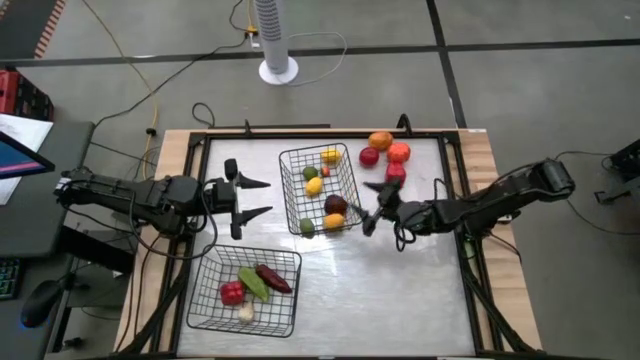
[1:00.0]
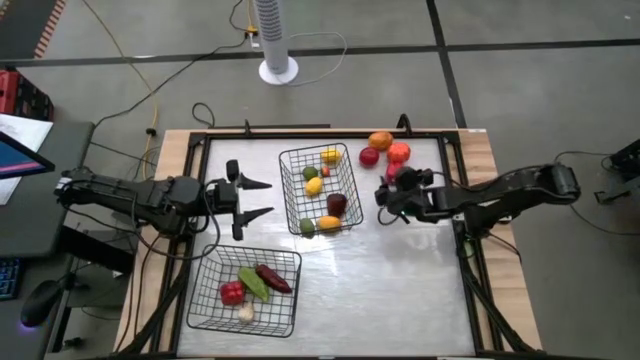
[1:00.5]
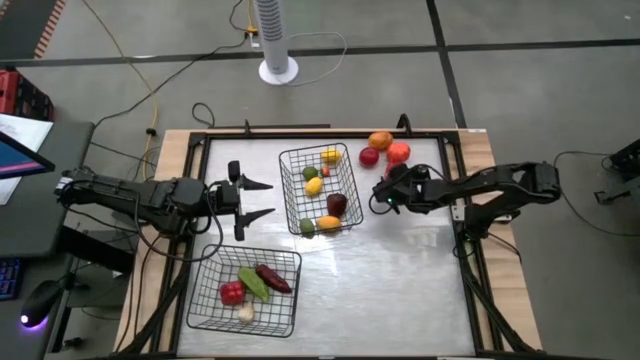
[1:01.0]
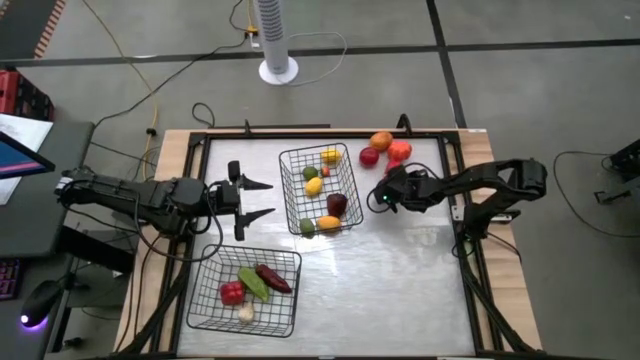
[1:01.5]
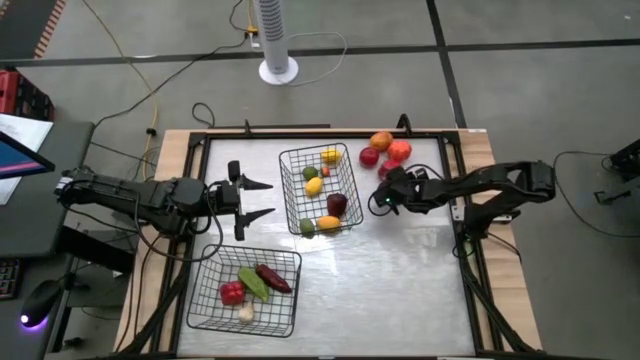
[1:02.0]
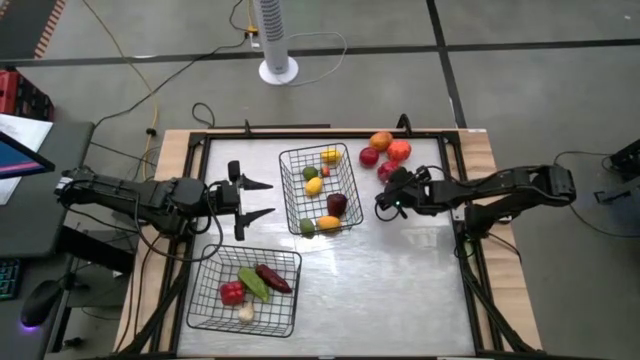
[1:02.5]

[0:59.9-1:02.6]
Task: Sort produce into baskets
Put the red bell pepper into the bottom black wire basket

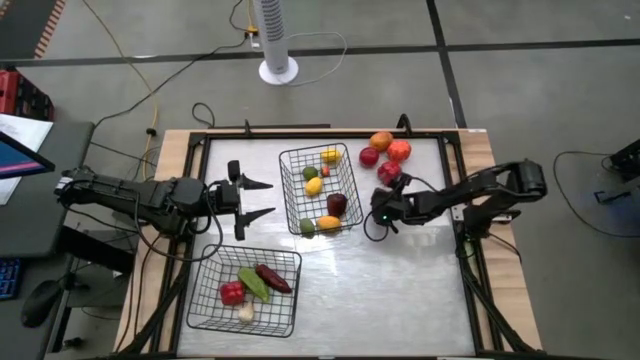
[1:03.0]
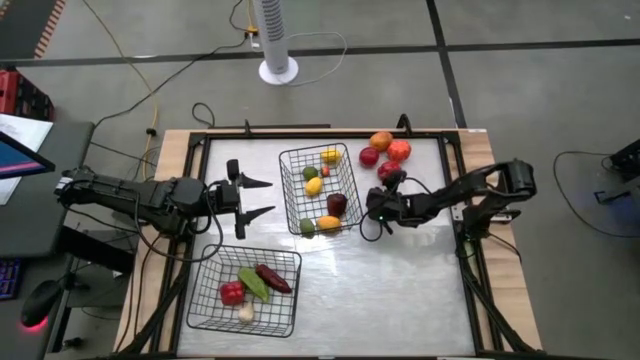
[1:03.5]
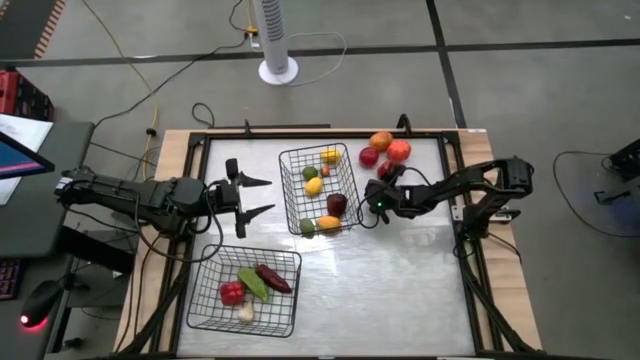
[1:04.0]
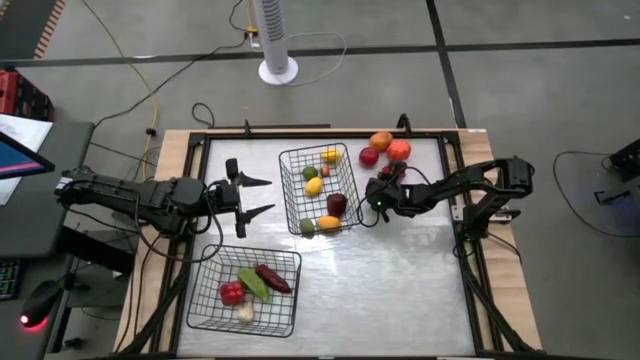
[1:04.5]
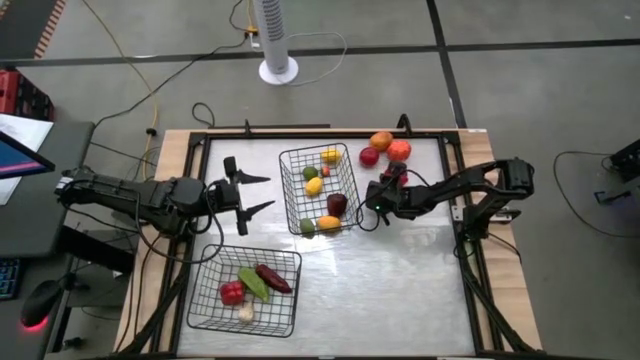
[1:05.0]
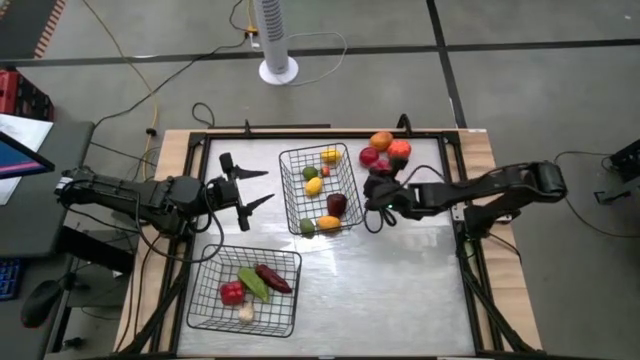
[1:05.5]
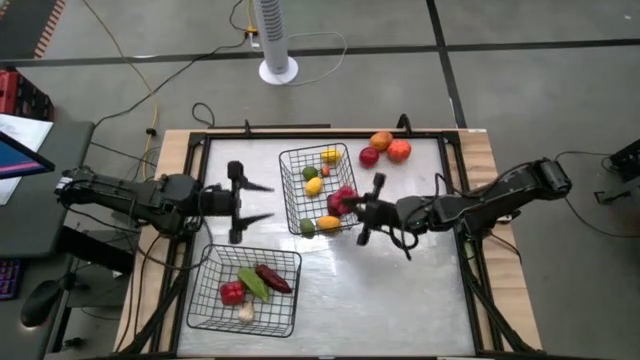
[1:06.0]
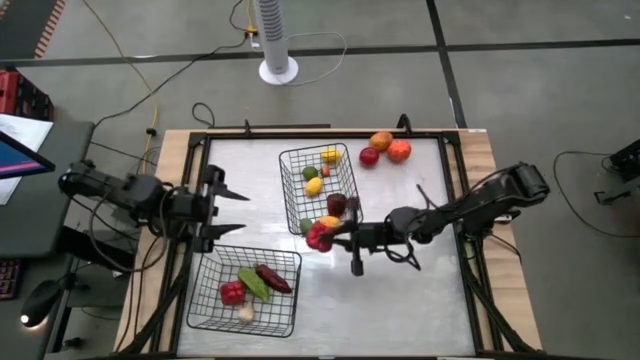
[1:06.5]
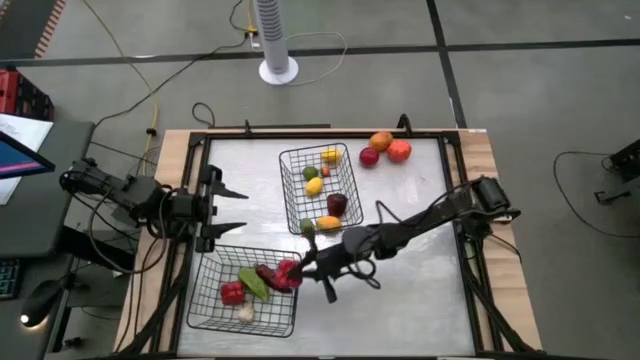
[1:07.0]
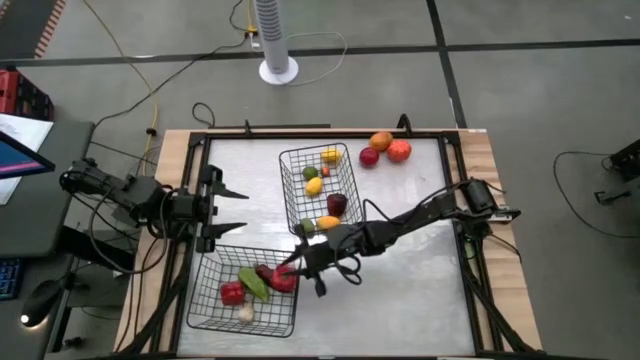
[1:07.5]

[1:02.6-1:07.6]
Put the red bell pepper into the bottom black wire basket

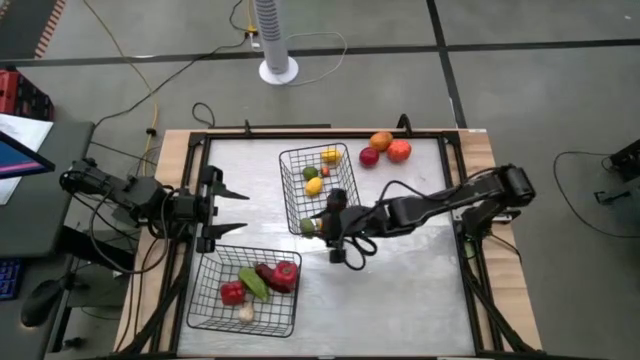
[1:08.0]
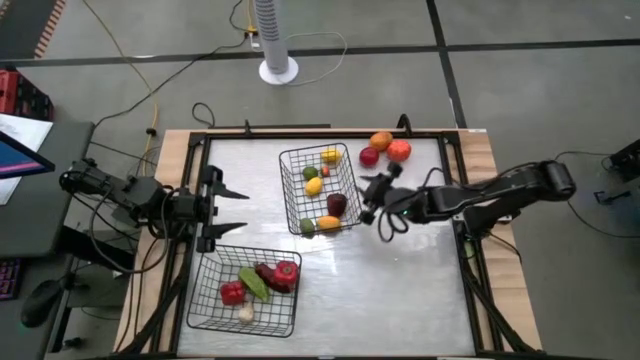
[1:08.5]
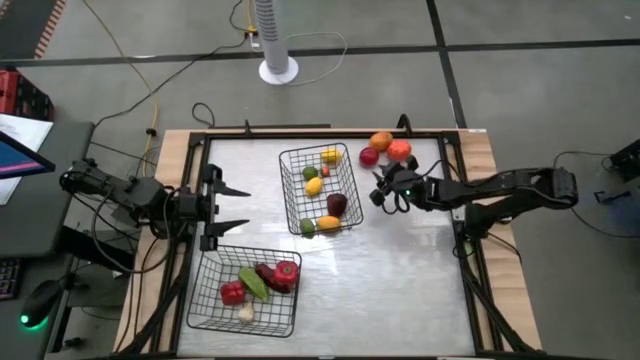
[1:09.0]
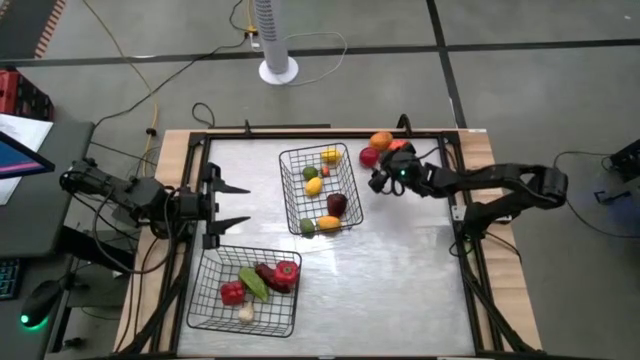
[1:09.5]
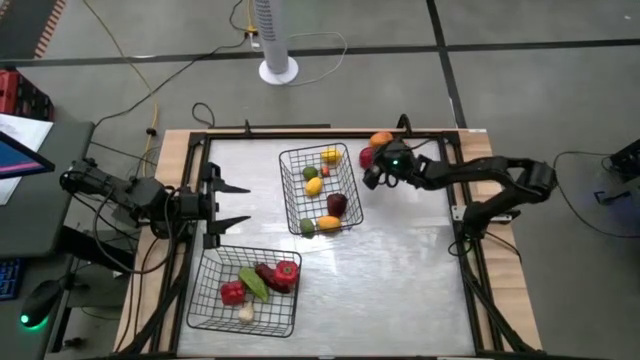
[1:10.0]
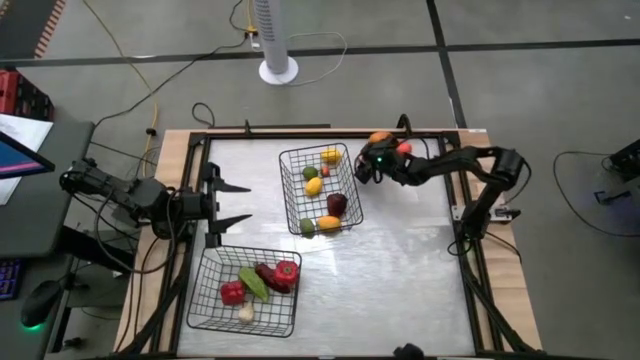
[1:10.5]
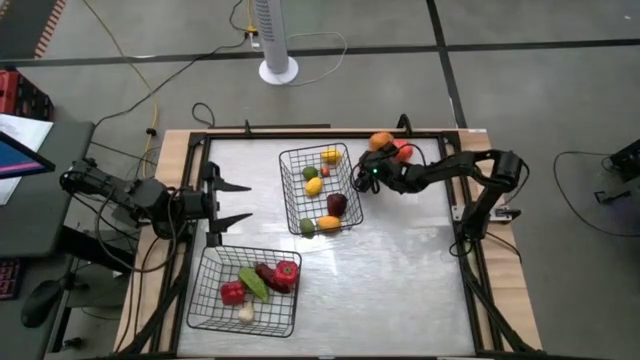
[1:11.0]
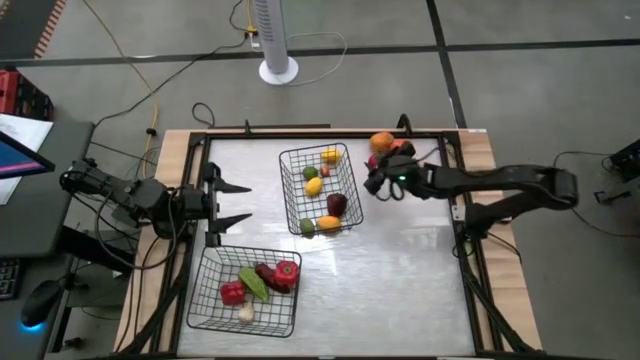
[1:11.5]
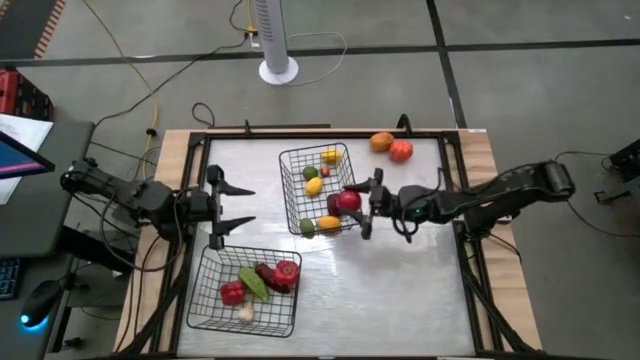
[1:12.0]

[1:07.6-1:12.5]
Put the red tomato into the top black wire basket

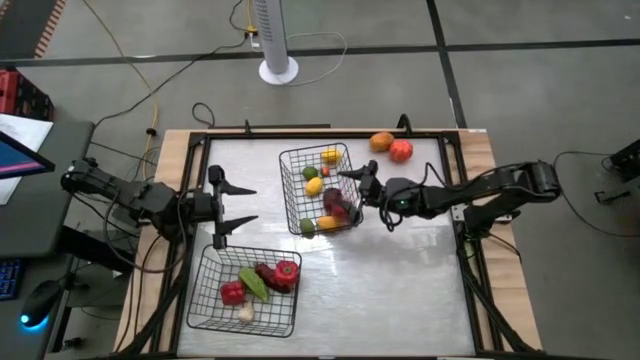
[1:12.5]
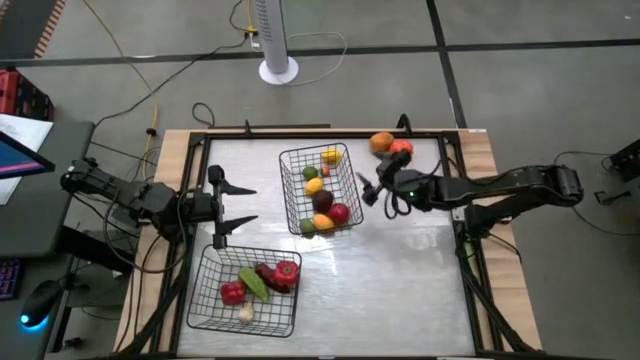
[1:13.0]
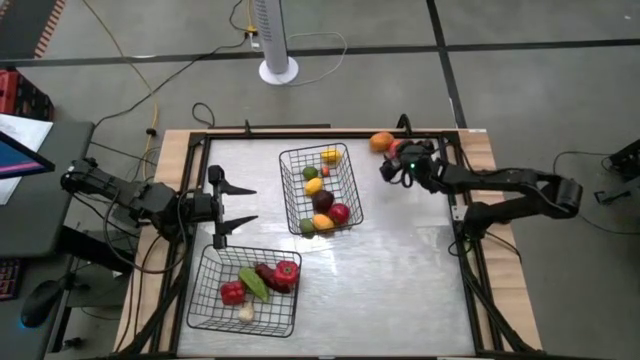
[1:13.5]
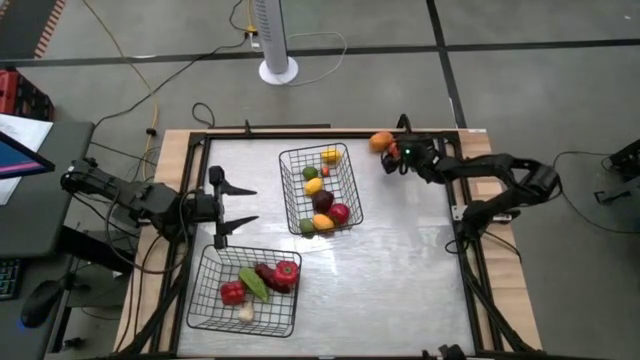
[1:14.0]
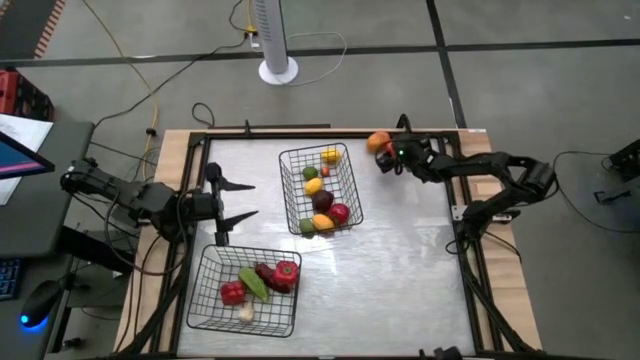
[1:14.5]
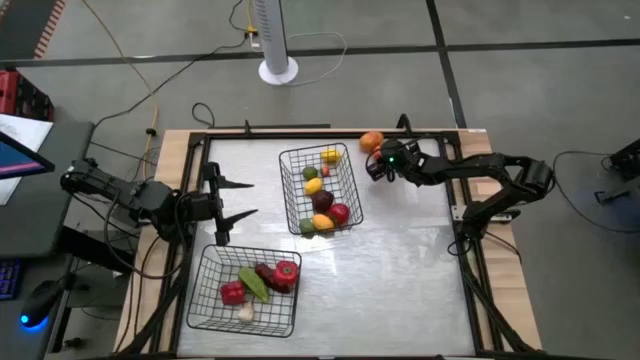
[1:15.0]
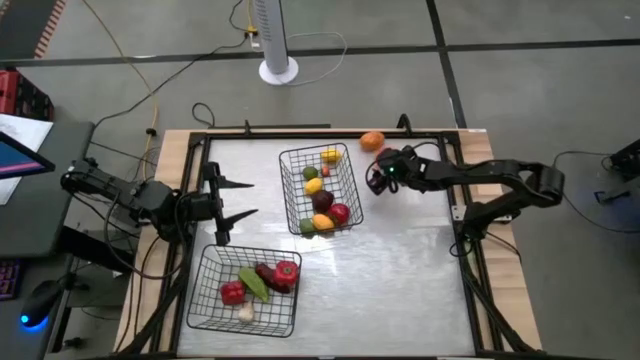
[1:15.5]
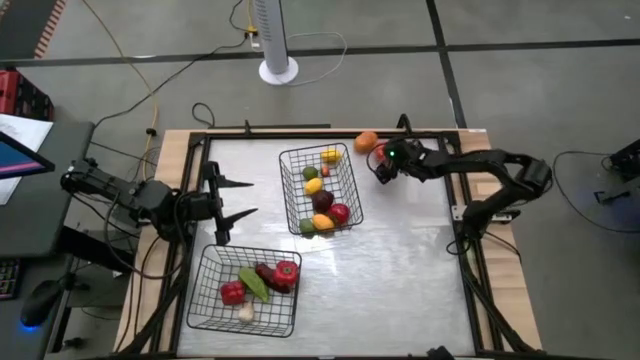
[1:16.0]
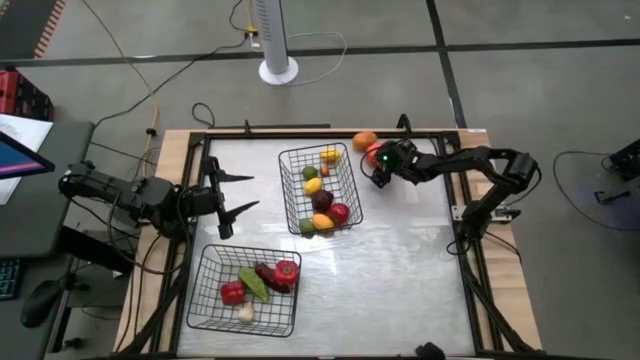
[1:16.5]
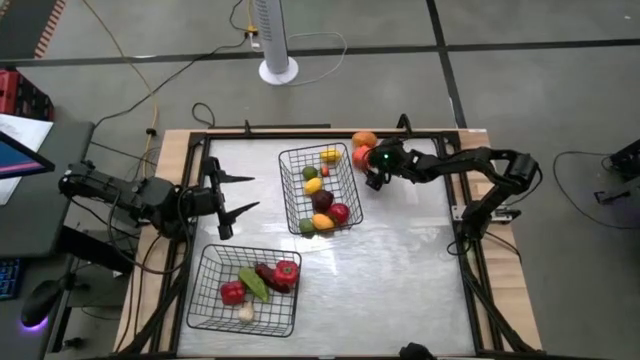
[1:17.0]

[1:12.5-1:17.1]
Put the orange pumpkin into the bottom black wire basket

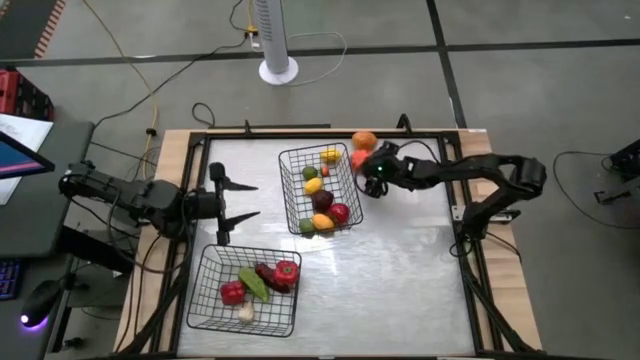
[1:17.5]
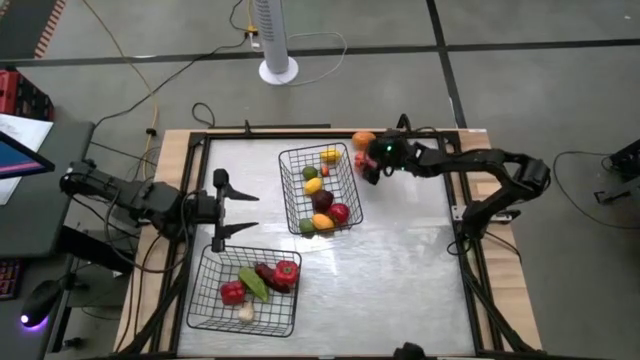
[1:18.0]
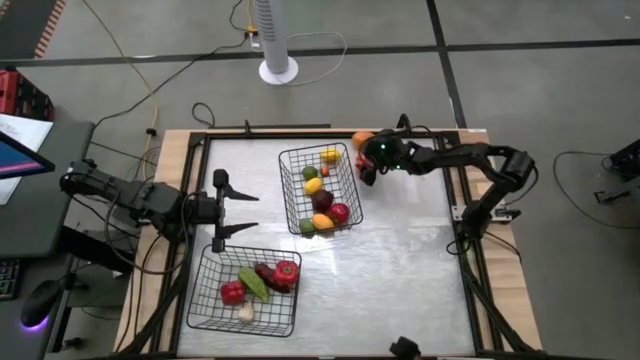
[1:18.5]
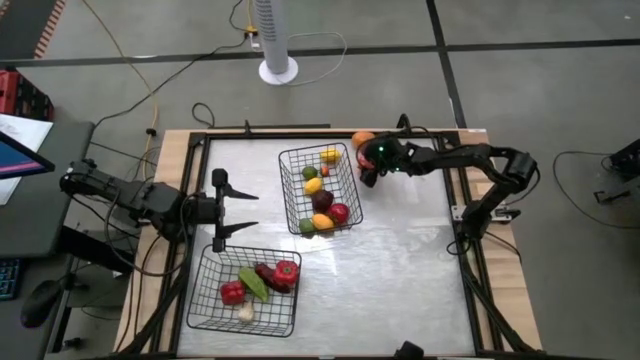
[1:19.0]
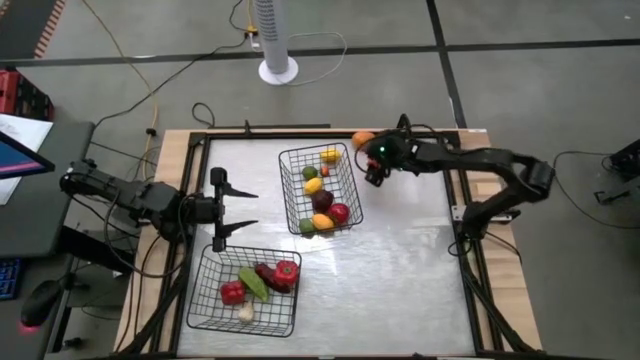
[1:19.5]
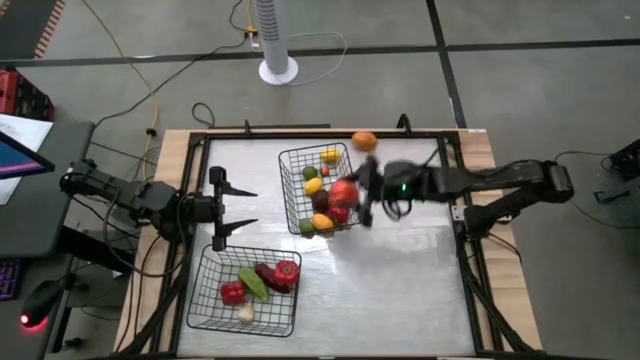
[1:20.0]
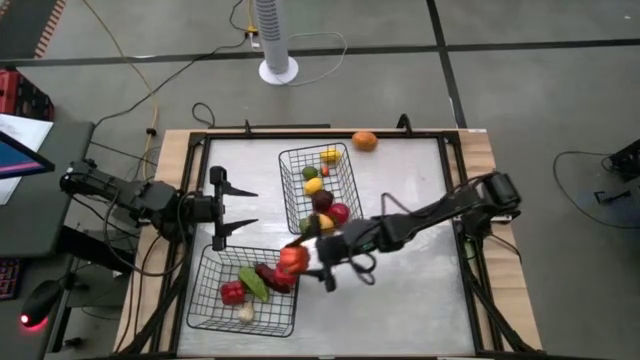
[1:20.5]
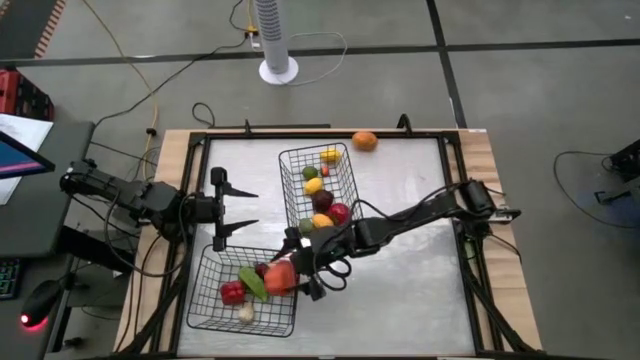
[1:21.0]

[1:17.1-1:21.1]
Put the orange pumpkin into the bottom black wire basket

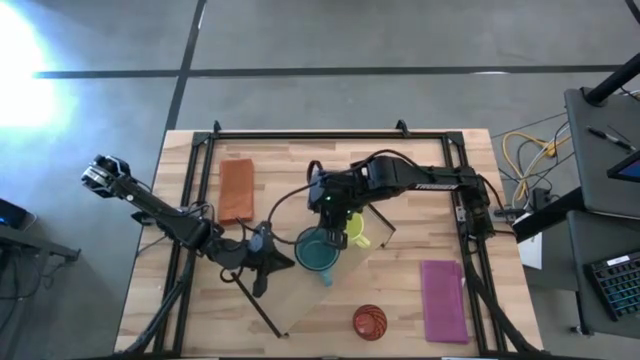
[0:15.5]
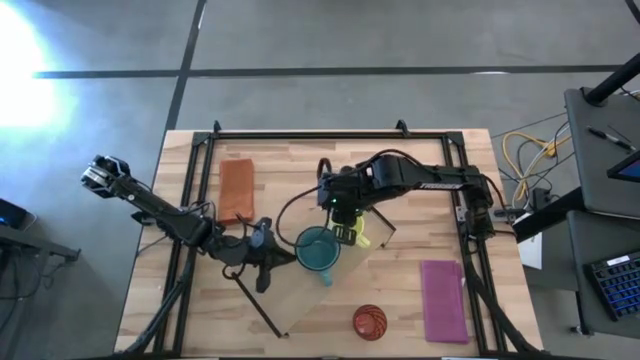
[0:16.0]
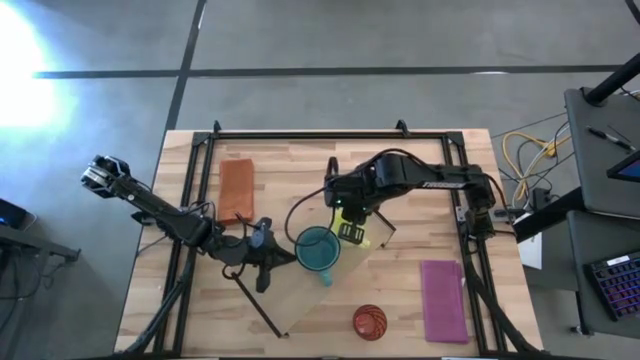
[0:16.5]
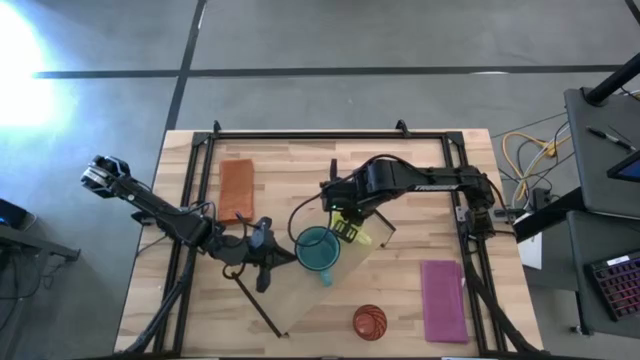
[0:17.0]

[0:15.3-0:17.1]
Task: Stack small to large cups/mugs on shelf
Adjust the yellow mug on the shelf
